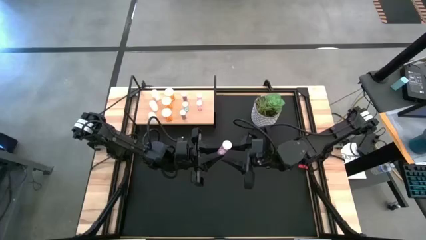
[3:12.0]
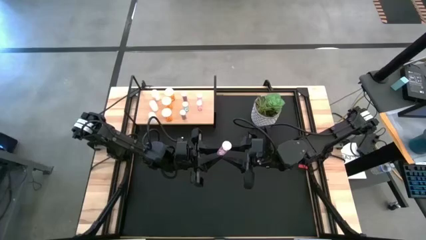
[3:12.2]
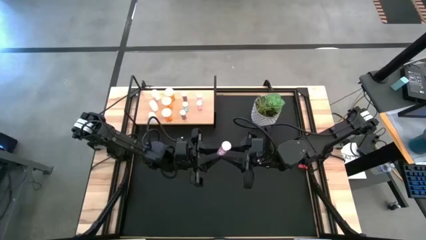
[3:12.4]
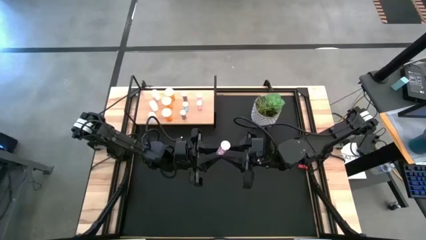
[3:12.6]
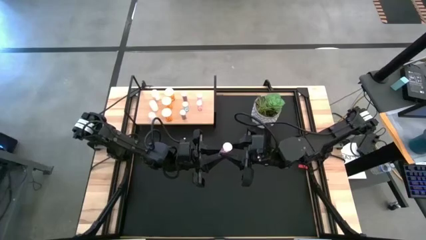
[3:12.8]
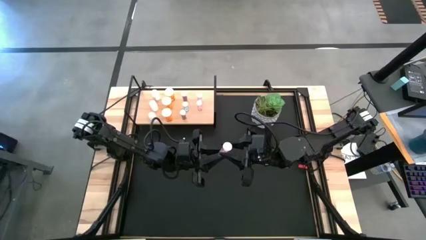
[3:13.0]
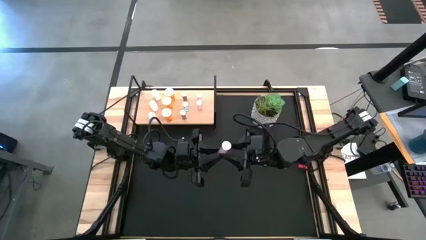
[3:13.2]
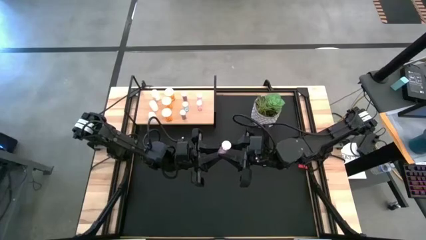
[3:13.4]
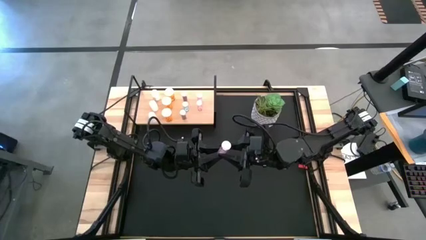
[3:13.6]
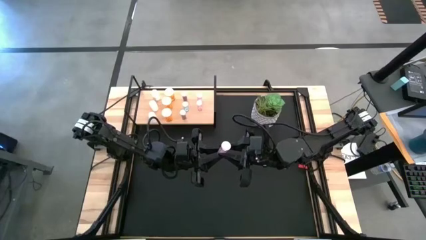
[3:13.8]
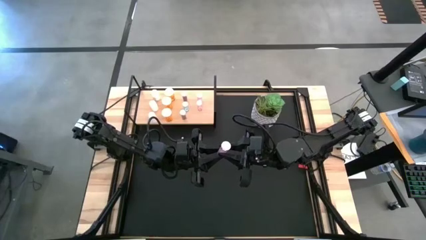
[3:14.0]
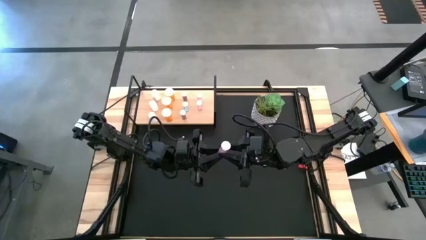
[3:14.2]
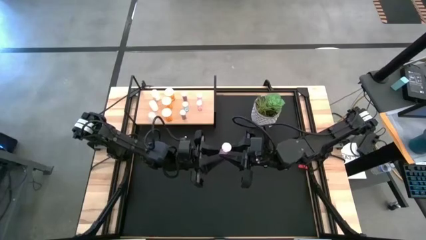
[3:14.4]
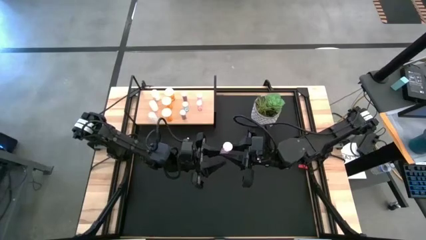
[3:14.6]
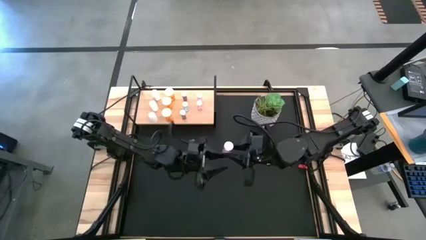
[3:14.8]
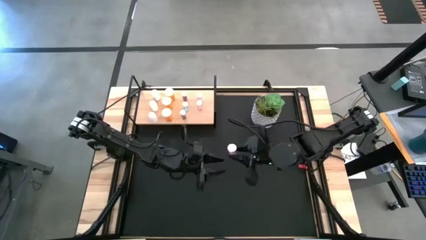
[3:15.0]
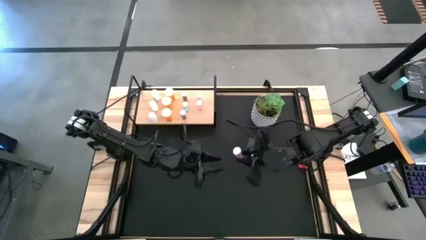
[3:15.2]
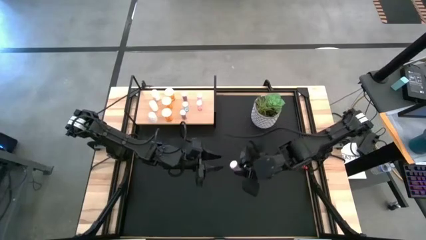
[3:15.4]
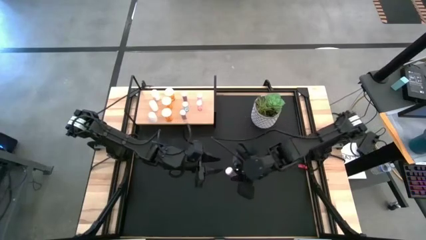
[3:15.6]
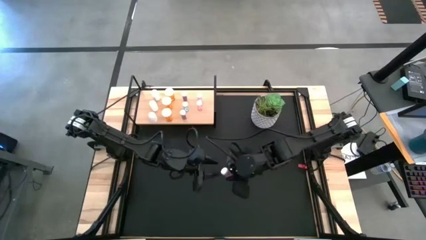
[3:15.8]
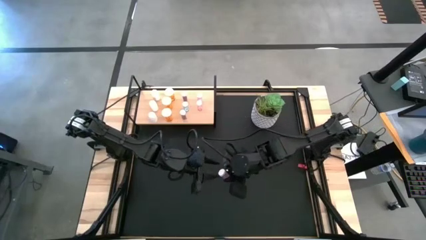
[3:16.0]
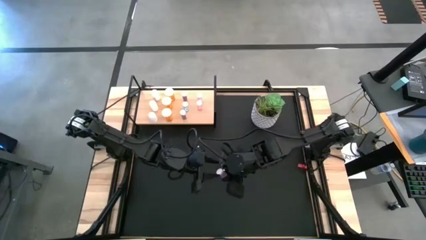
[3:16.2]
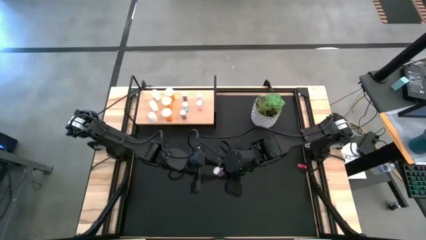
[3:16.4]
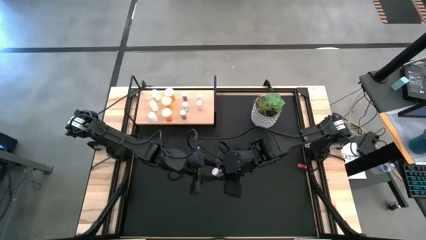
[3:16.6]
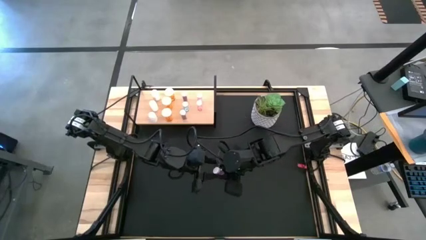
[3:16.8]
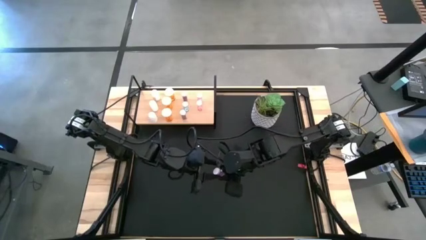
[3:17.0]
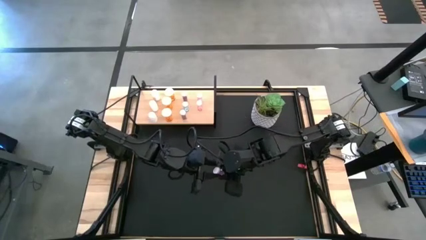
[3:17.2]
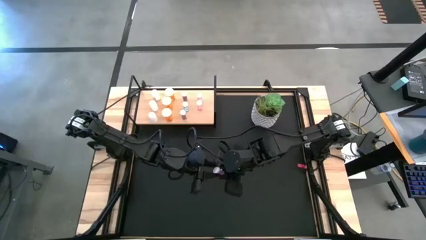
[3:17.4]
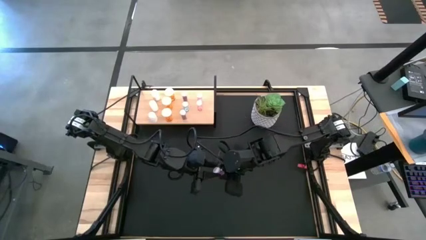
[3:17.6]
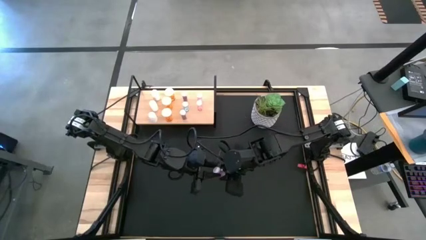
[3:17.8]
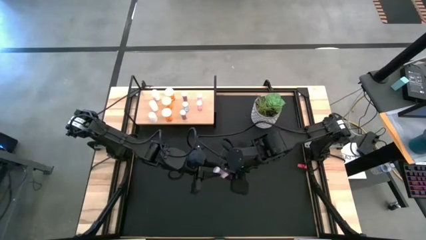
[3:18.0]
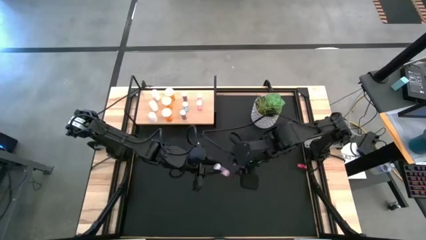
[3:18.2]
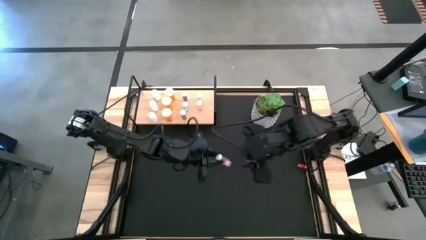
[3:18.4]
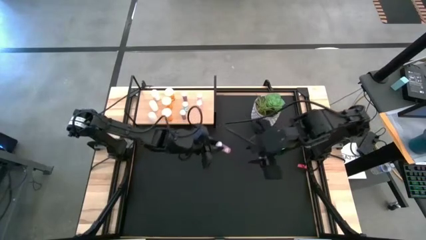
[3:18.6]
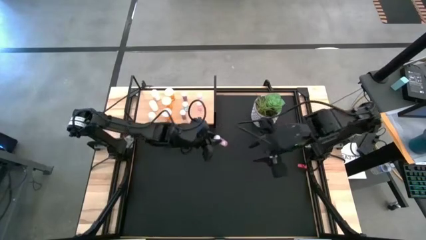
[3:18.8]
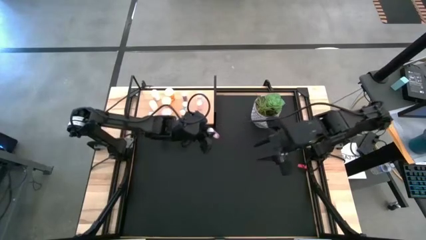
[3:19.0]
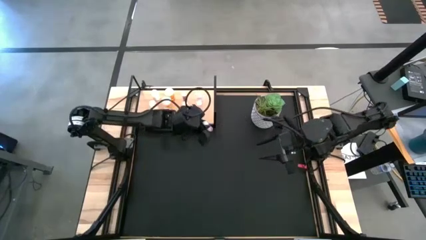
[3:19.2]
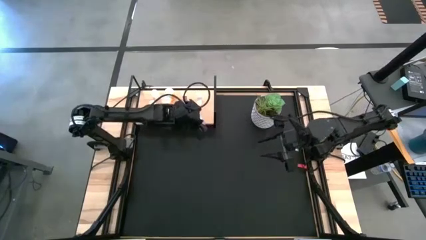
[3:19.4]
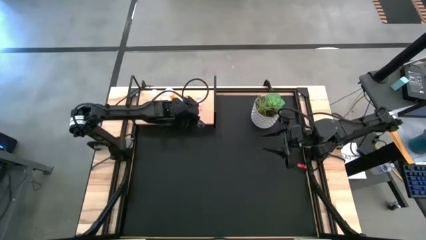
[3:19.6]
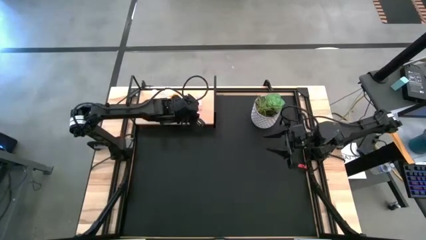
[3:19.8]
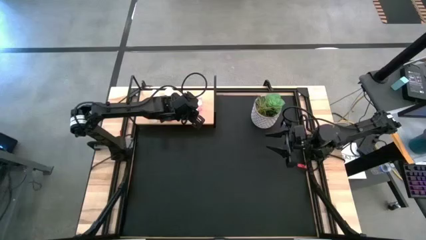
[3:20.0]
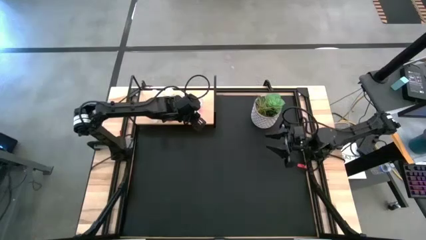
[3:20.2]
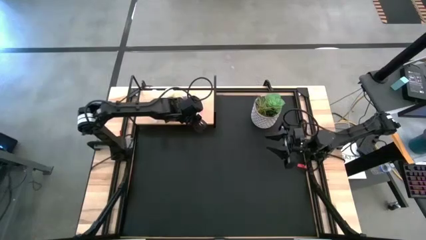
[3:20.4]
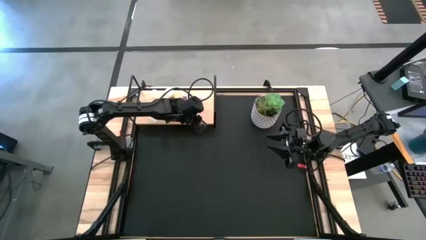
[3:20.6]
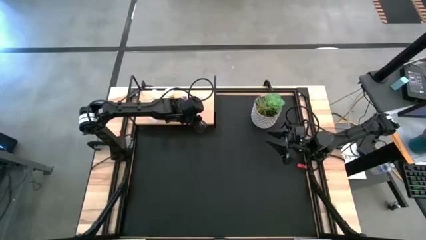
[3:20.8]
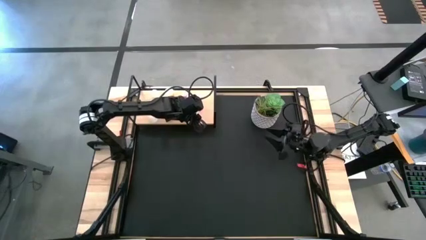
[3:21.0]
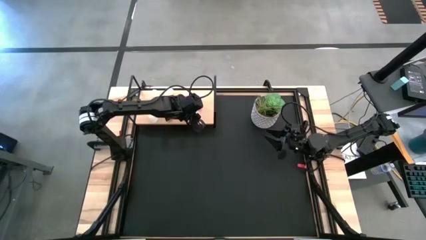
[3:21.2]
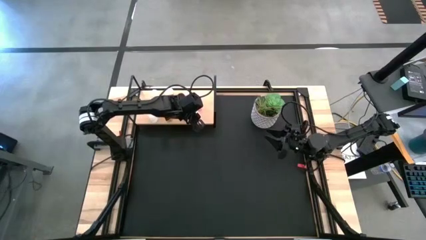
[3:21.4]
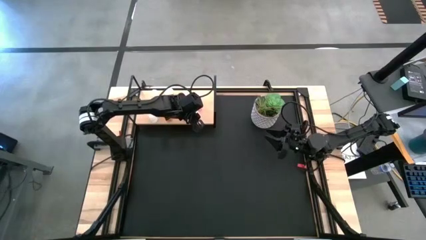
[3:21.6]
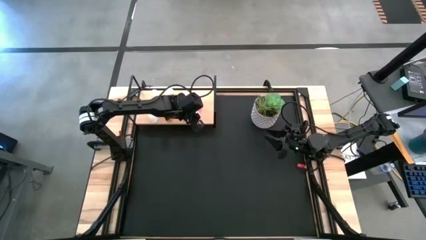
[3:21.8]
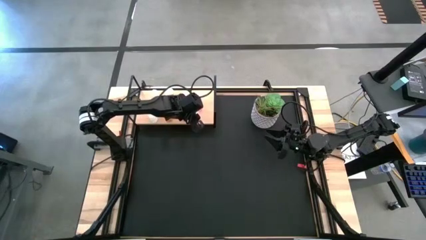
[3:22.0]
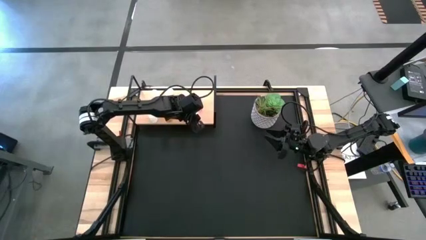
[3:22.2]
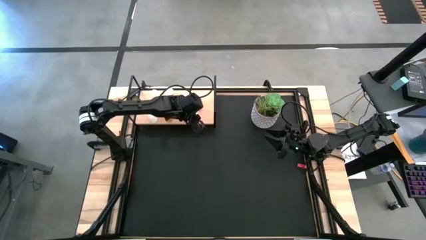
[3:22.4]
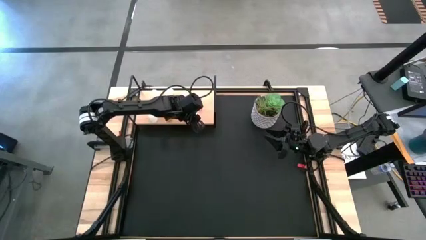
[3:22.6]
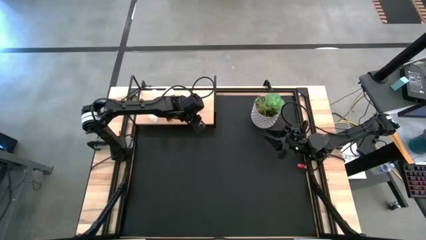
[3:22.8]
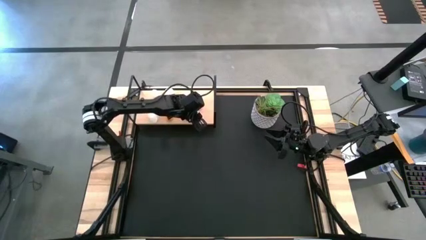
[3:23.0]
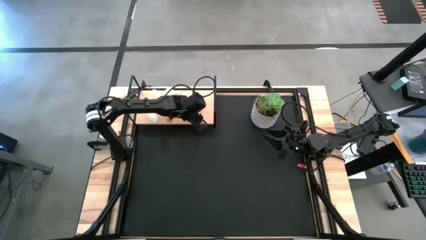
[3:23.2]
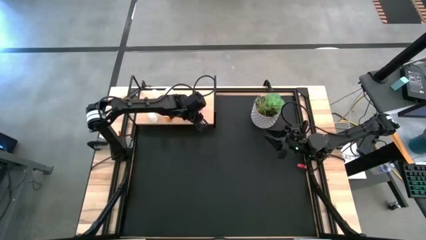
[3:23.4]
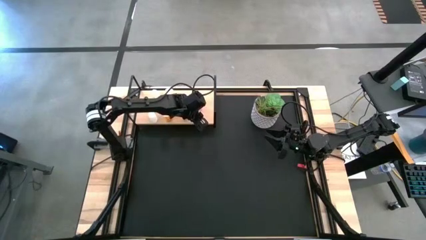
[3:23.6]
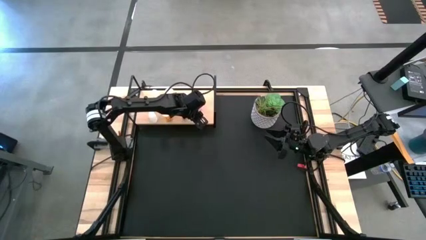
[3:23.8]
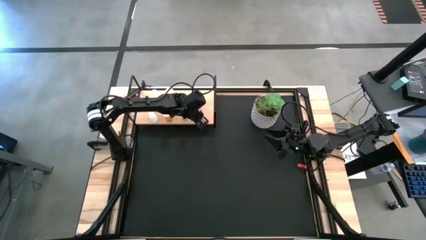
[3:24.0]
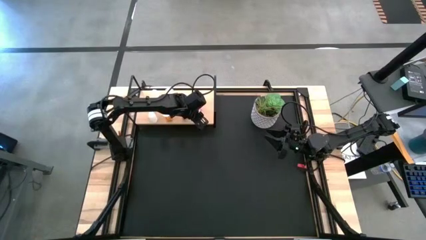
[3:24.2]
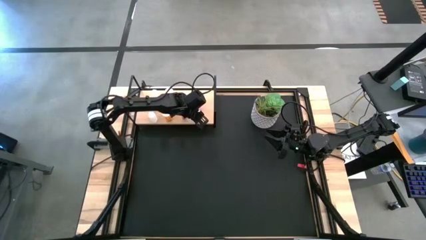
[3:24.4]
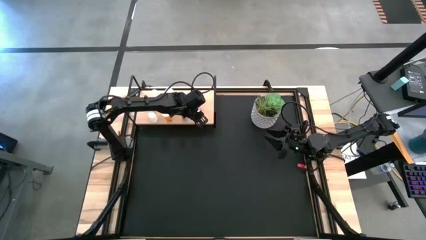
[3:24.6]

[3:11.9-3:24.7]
Task: Pick and place medicine bottles onto shelf by color
Put the pink pill bottle on the shelf aligned with the other pink pill bottles

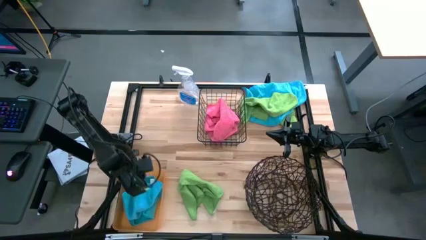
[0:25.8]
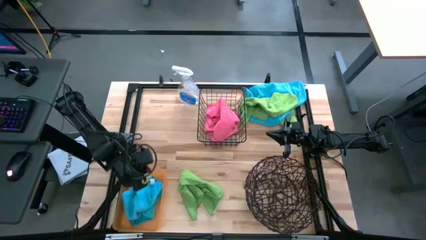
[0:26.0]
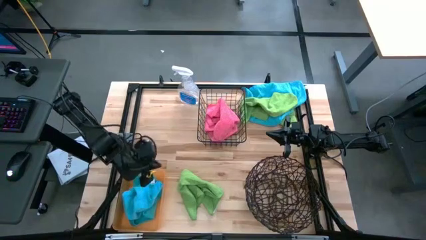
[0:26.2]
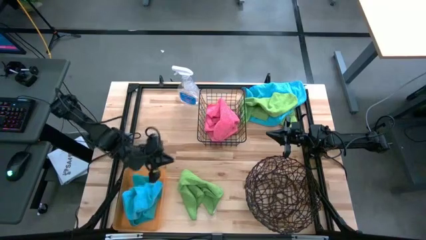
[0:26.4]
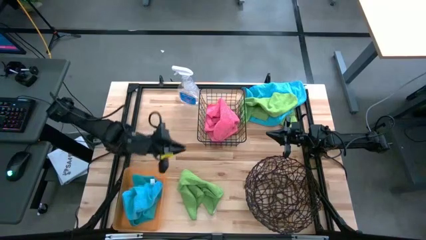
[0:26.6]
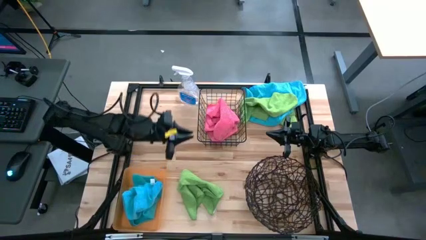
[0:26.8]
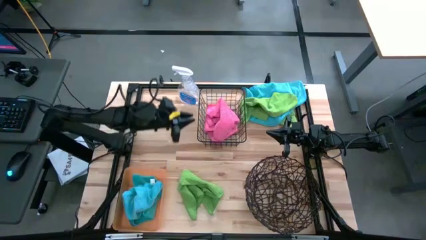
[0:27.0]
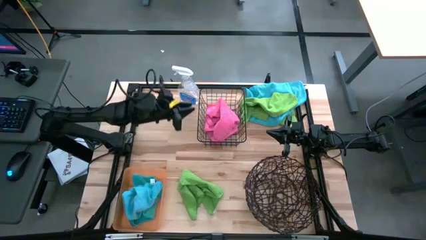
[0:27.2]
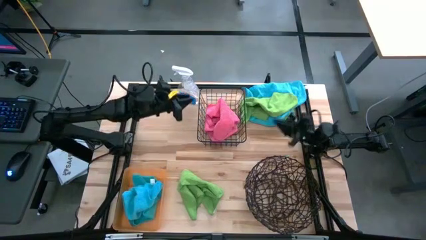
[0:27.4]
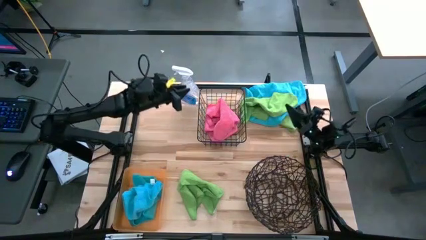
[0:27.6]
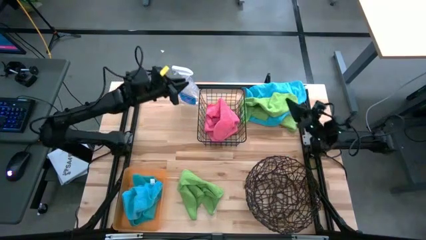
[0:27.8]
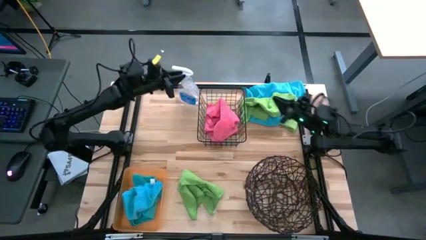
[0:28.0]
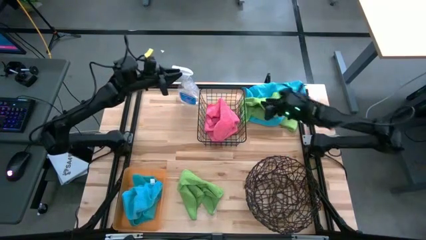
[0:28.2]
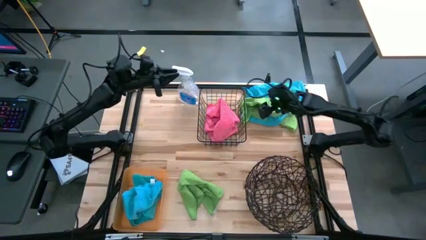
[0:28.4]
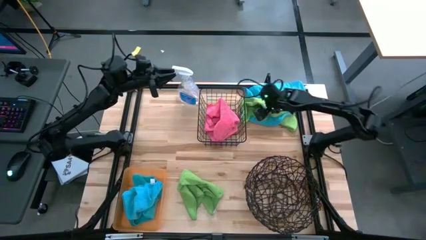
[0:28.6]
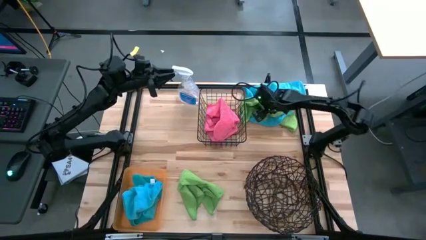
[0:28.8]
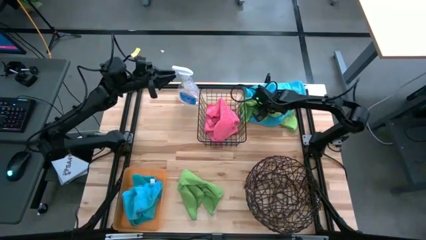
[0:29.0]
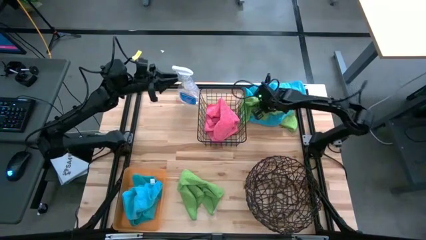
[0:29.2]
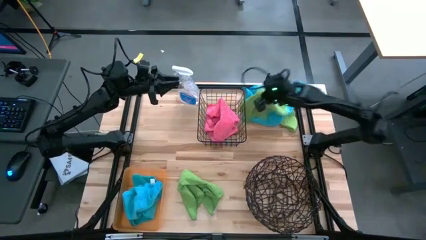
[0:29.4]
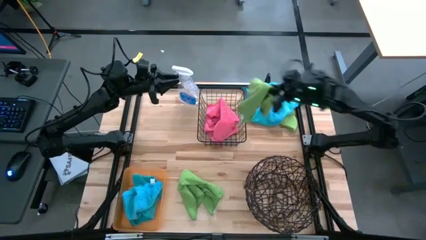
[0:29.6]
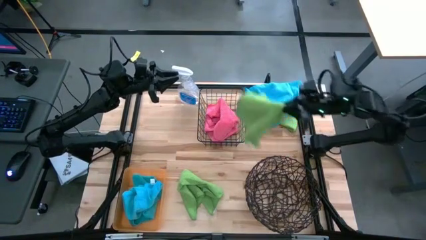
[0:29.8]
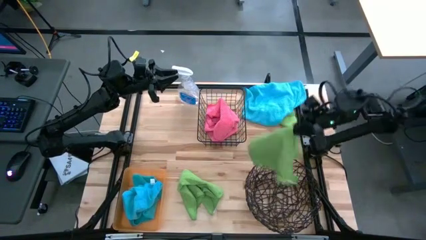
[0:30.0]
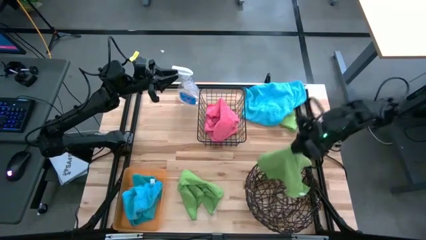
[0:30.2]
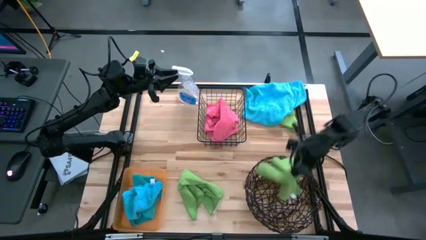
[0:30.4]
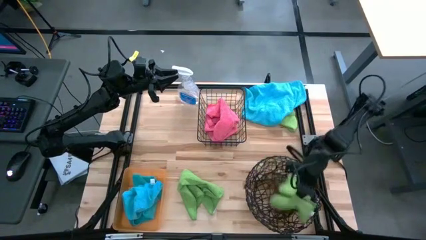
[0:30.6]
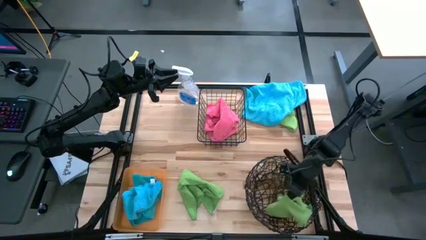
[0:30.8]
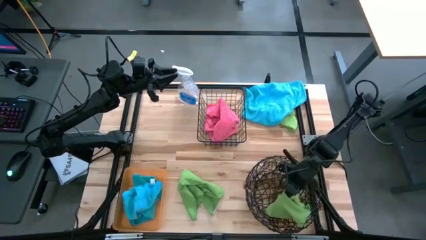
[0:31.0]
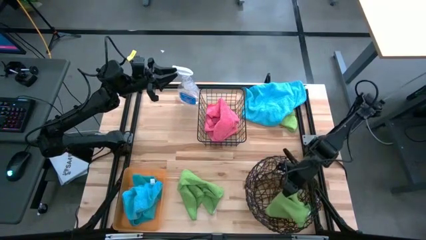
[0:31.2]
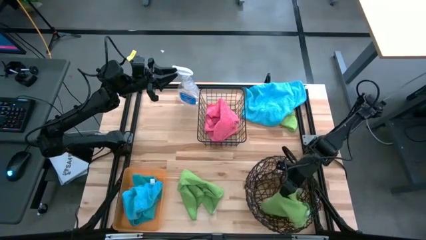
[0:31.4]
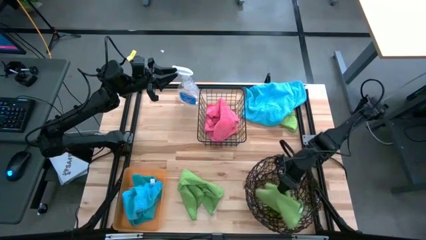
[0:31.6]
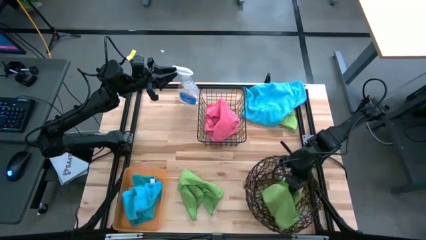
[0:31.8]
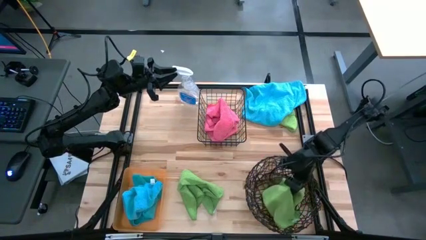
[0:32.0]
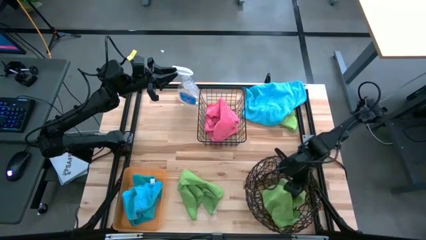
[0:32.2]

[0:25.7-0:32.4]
Task: Sort microfiber towel by color & place in baskets
Put the green towel into the black woven basket
